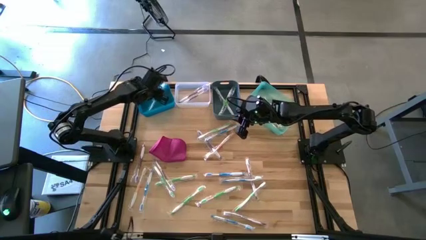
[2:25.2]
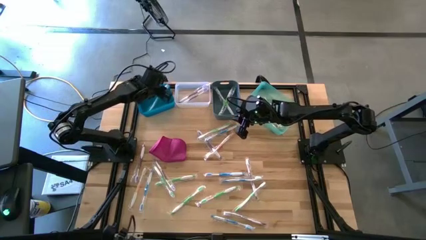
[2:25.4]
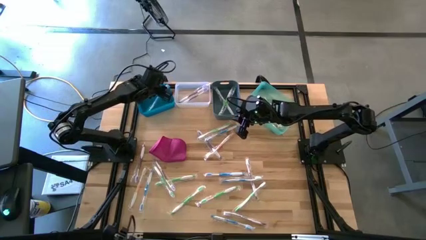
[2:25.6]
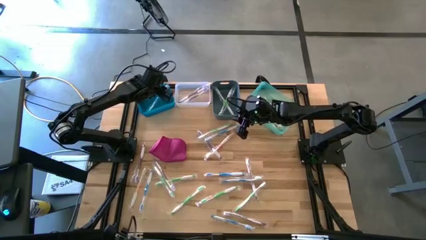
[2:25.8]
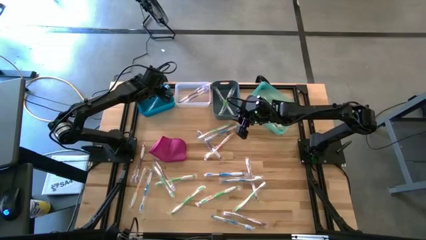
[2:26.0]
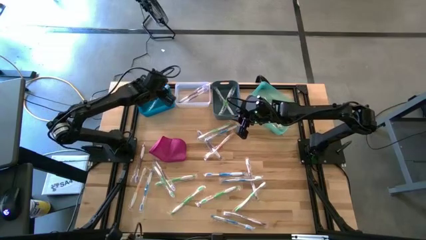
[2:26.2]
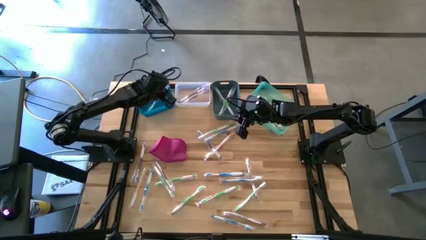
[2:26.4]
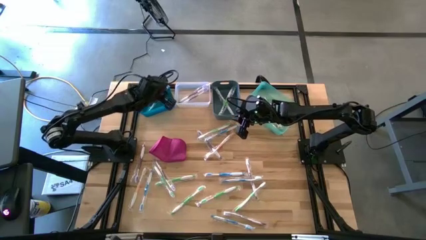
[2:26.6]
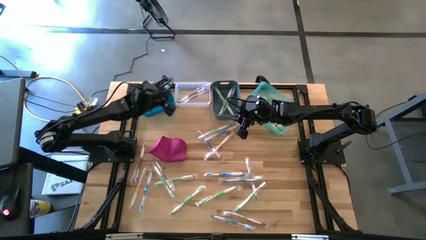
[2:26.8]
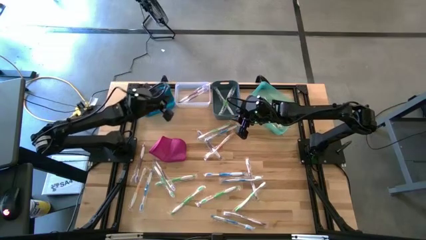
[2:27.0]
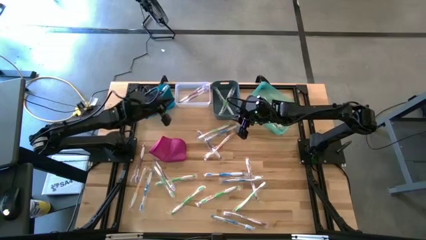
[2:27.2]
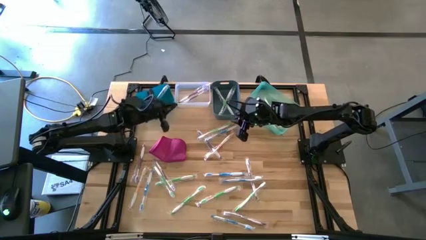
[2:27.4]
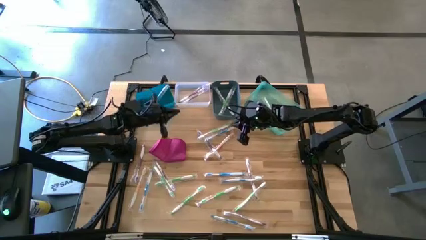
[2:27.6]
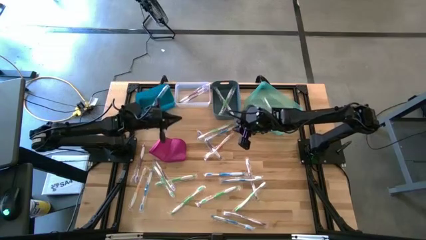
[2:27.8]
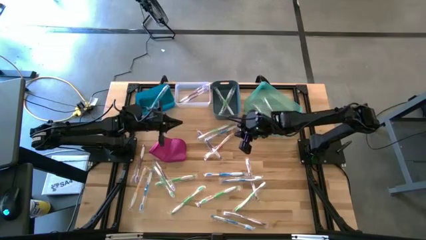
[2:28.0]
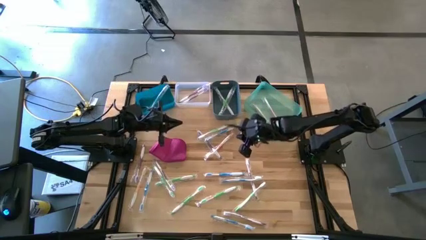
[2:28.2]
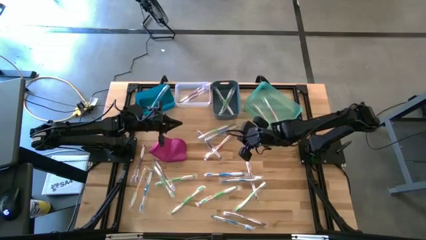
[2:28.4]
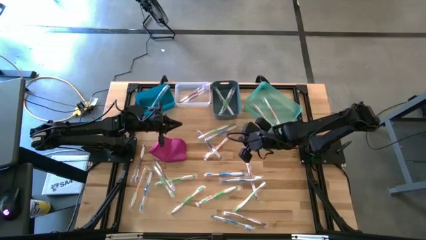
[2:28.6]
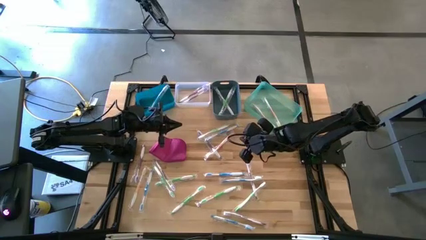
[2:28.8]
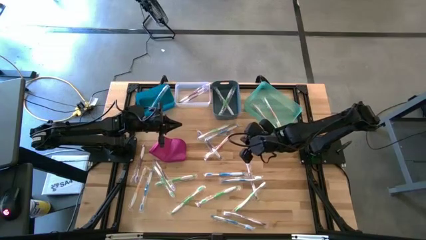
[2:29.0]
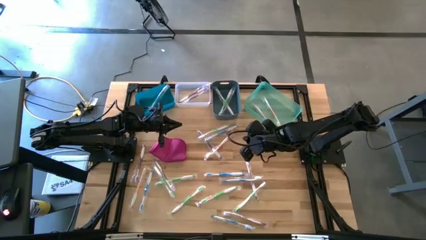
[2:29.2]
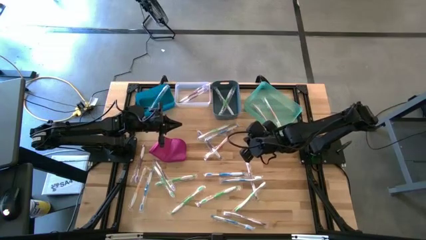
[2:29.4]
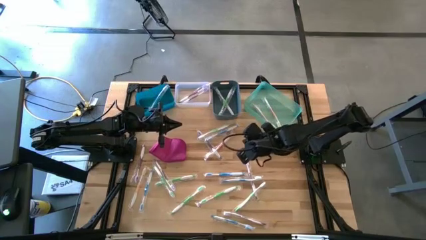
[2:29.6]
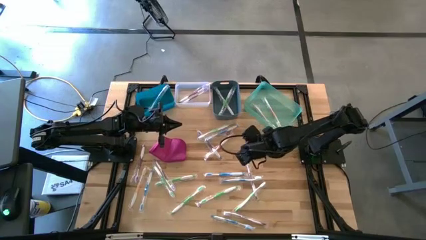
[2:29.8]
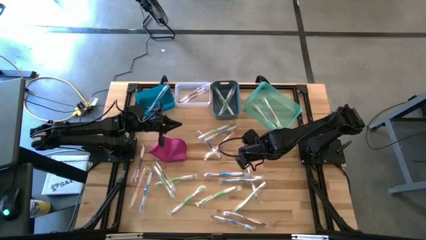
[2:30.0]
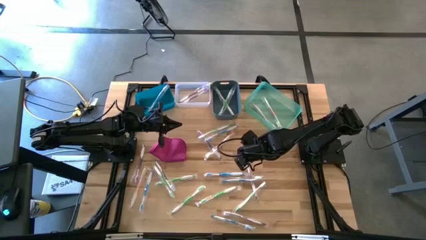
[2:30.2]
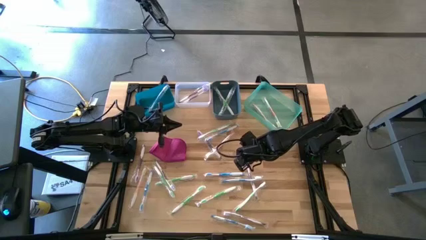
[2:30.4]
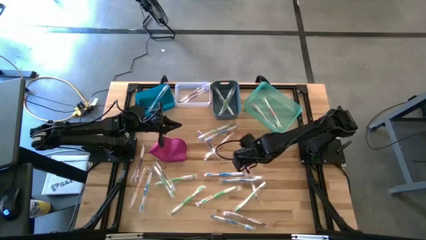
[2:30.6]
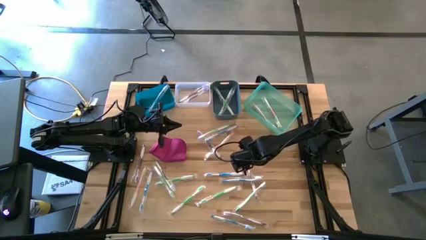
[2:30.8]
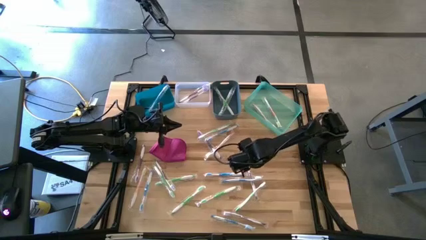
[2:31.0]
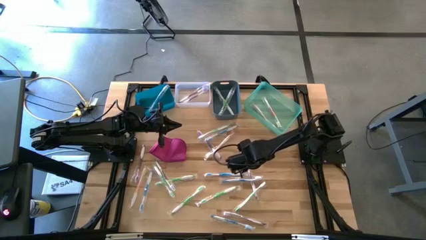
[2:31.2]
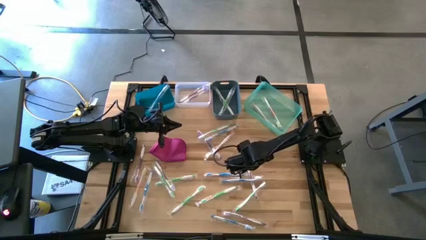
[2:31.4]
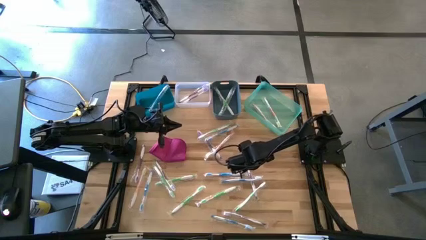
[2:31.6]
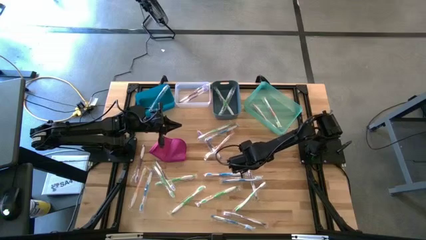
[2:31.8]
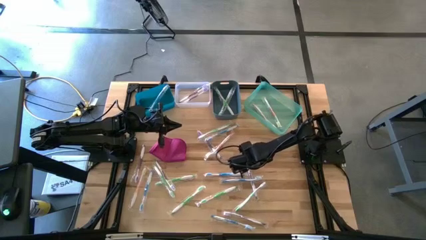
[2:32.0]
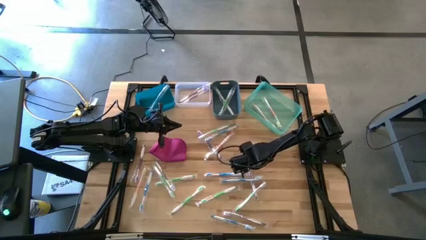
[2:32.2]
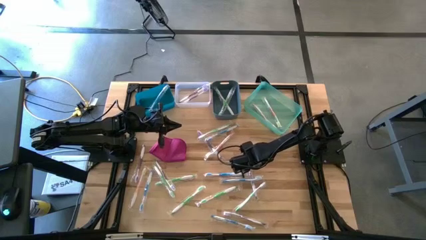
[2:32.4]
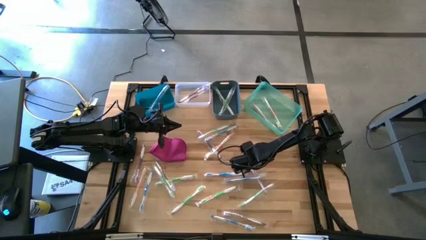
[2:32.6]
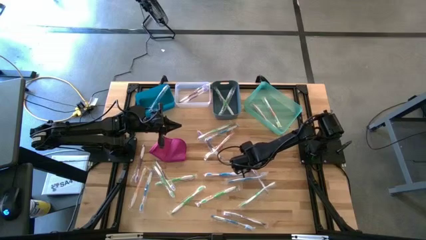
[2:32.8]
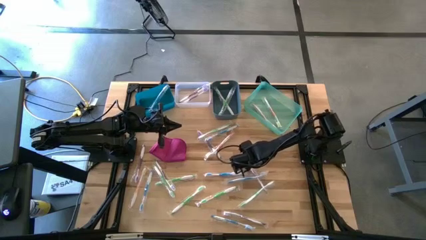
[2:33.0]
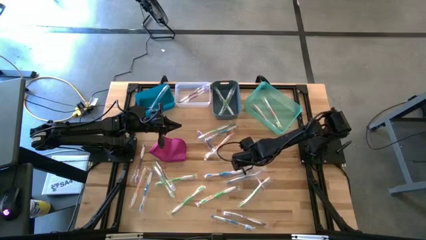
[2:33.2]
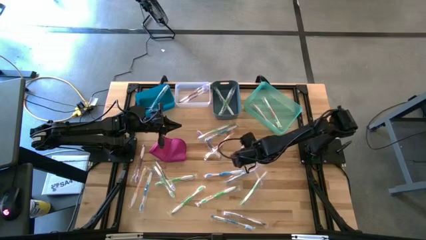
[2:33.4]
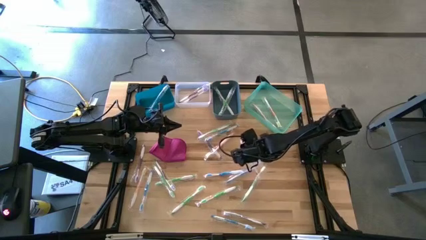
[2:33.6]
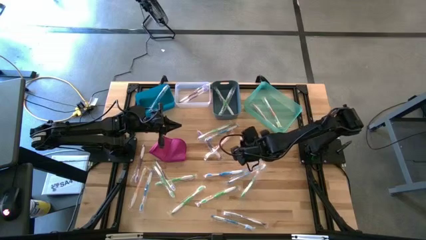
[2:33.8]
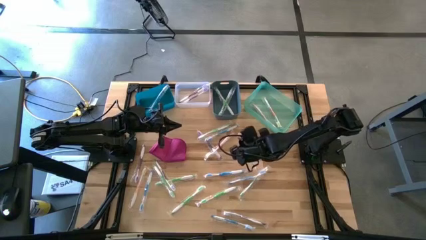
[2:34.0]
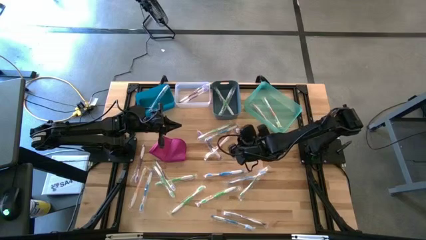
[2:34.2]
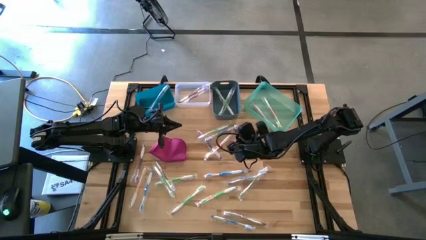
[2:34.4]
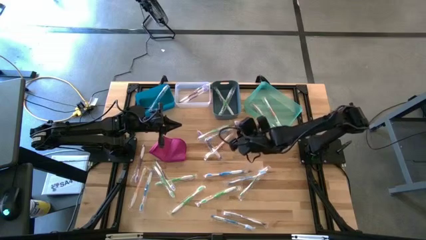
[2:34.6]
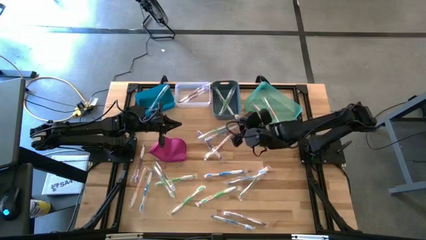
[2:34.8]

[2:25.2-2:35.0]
Task: Pick & Place Toothbrushes
Put the violet toothbrush into the white bin

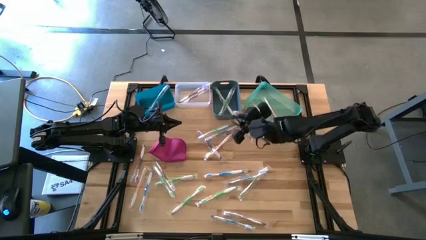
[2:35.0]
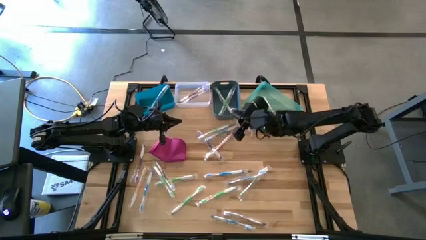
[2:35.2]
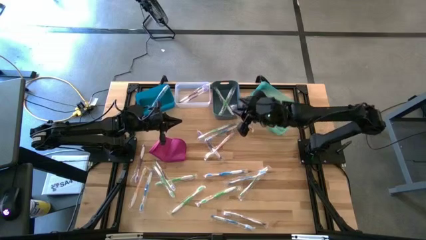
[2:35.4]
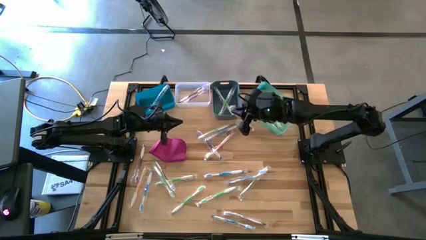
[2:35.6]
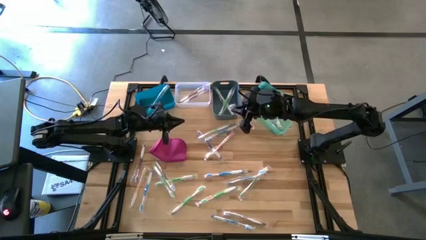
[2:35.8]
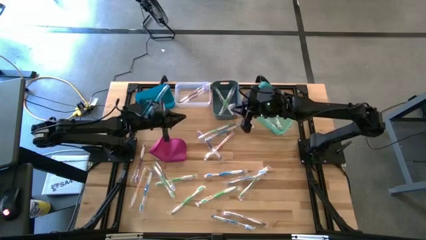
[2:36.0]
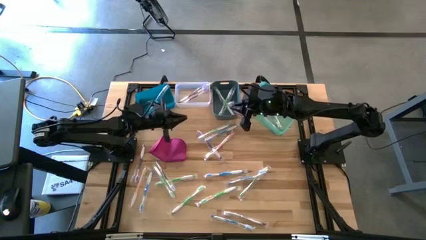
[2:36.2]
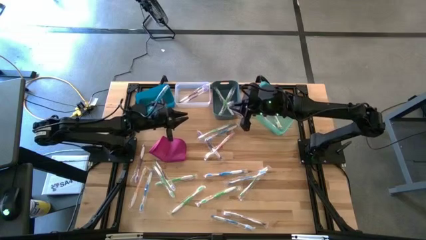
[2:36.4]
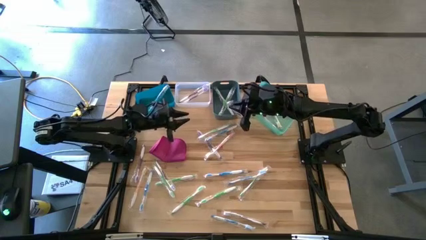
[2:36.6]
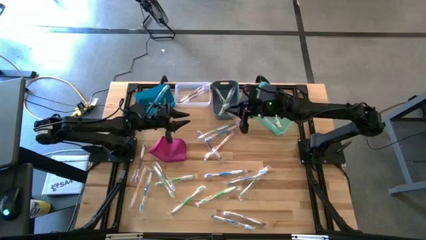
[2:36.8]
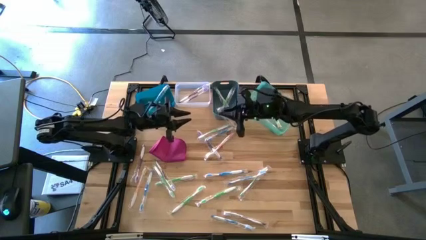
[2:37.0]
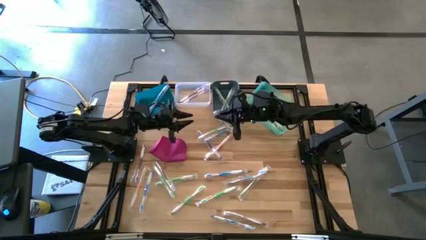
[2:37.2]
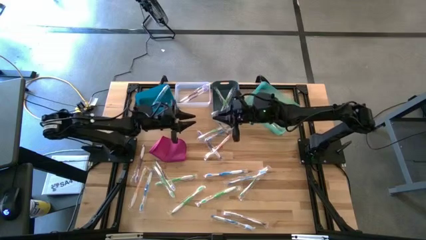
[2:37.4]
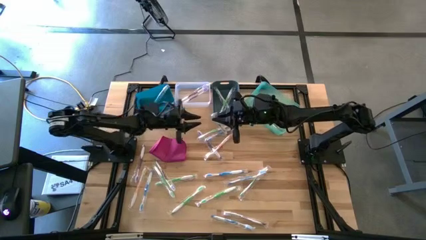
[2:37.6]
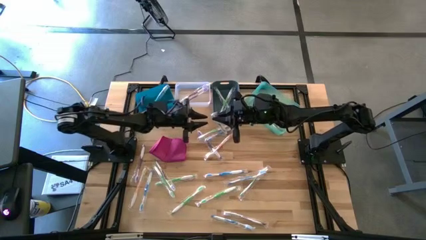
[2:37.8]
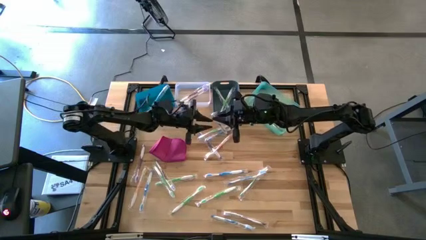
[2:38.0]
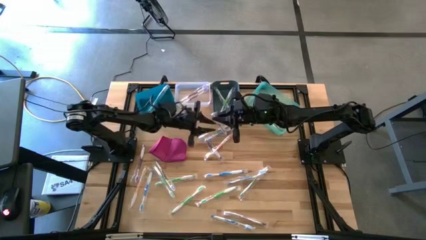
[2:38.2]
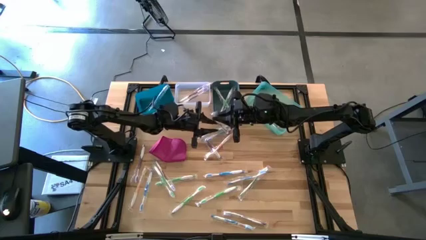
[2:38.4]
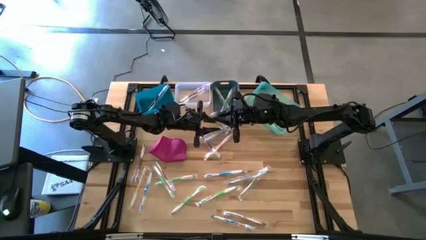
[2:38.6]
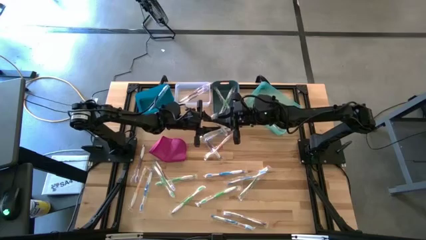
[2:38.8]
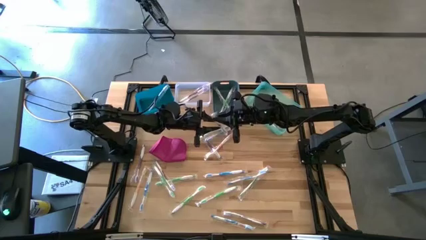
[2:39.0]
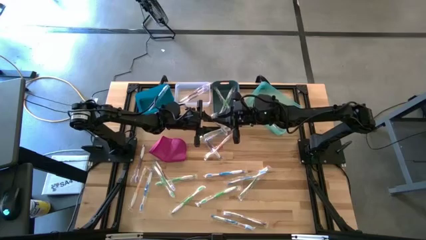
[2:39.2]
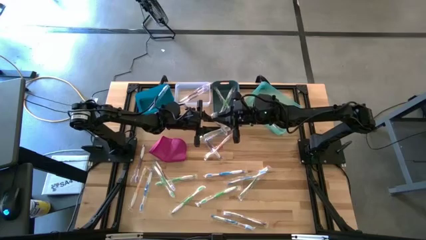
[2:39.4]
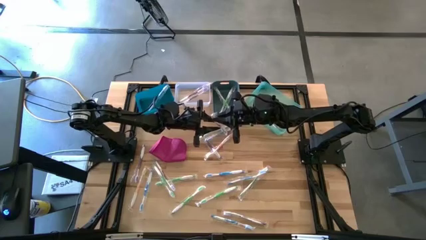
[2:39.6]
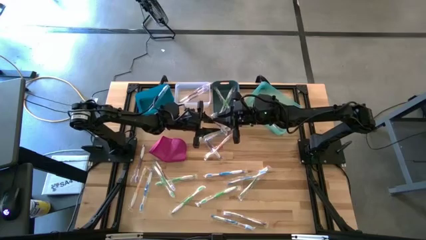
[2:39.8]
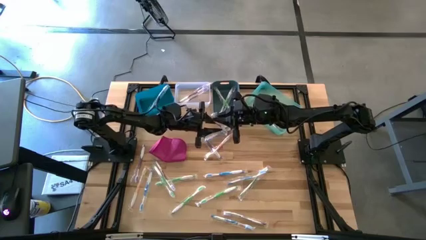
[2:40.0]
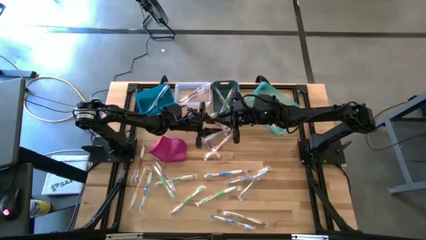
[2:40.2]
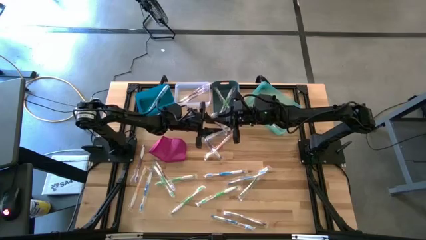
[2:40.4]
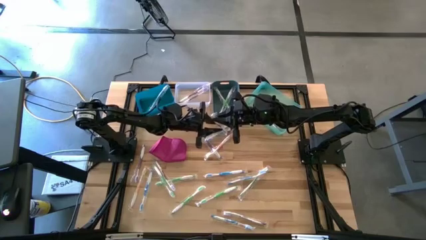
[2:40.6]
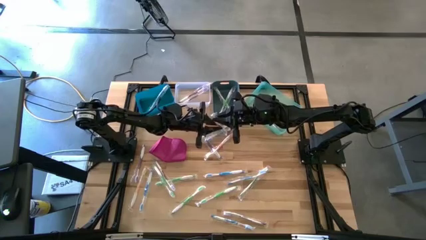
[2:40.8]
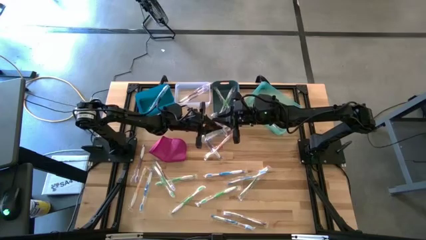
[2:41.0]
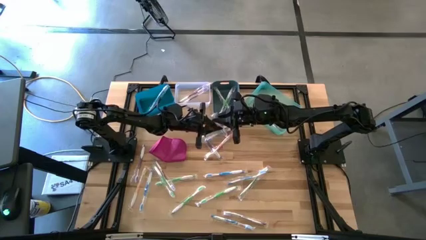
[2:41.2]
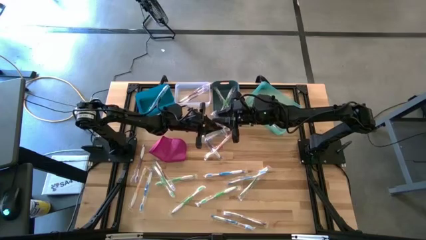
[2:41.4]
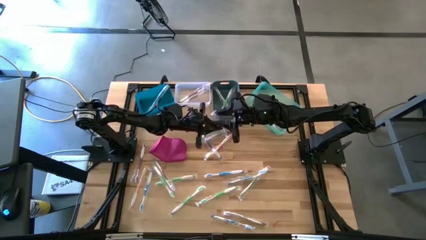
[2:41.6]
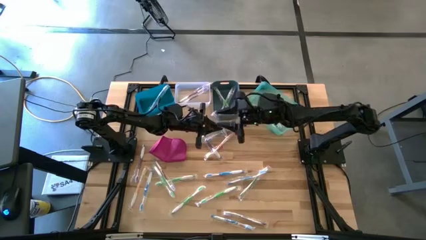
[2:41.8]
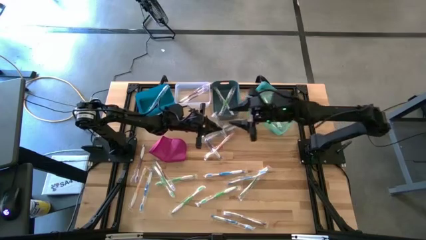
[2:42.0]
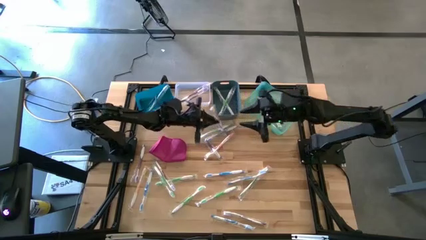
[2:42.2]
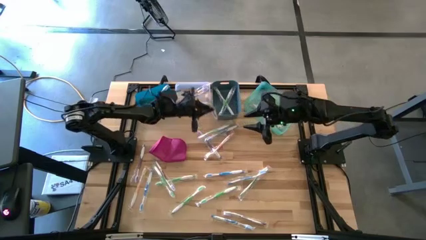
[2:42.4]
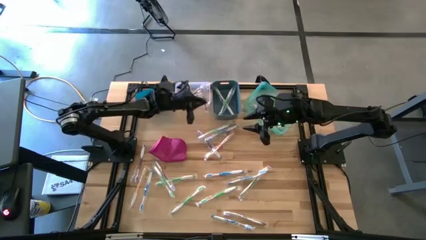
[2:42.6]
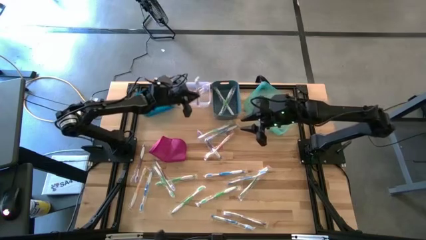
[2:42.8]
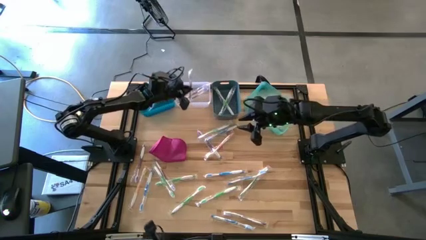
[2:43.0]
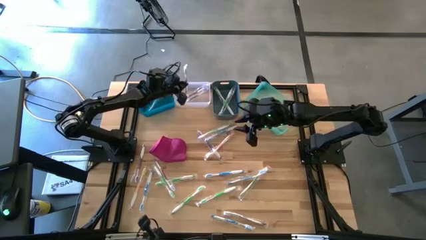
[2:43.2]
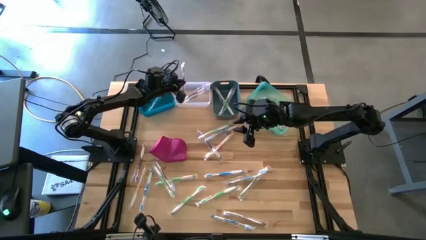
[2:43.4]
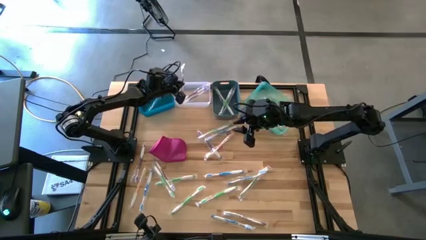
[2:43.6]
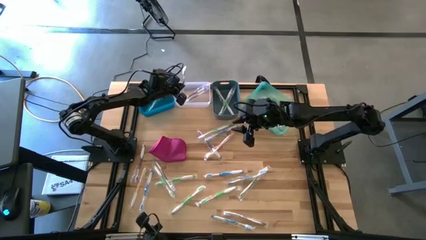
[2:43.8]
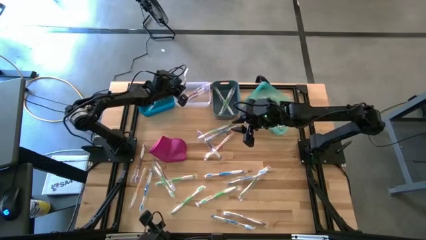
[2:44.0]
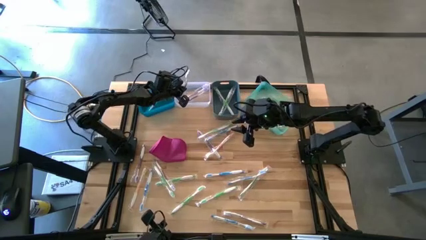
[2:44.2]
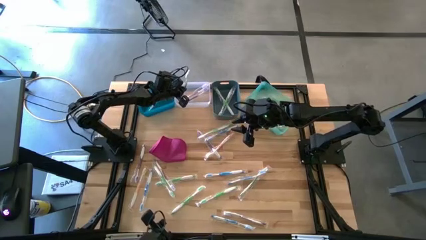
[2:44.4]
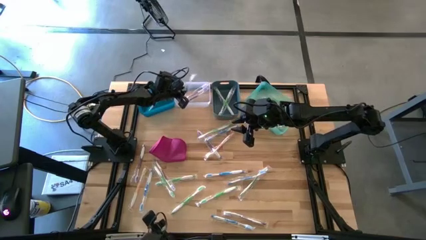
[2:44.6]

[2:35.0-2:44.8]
Put the violet toothbrush into the white bin
